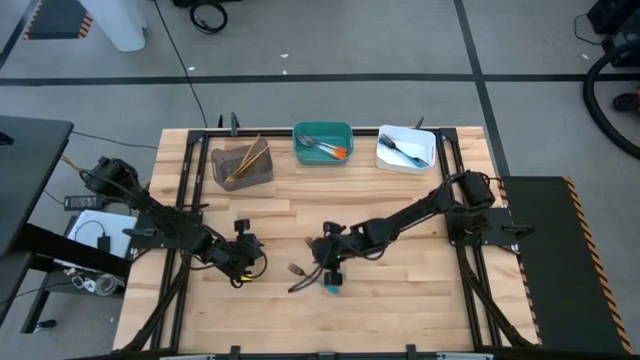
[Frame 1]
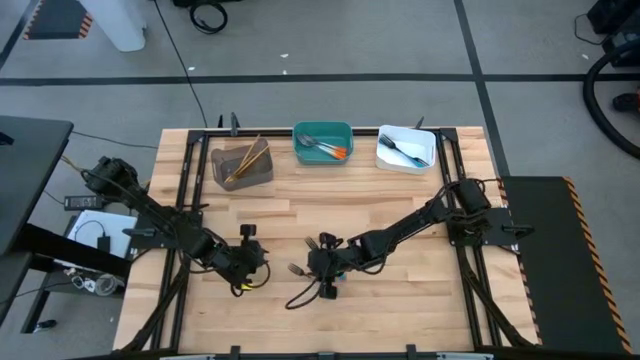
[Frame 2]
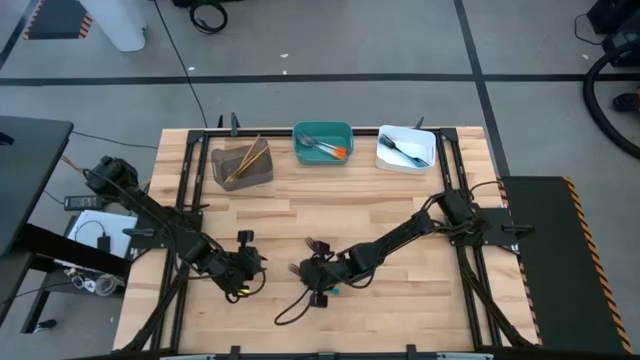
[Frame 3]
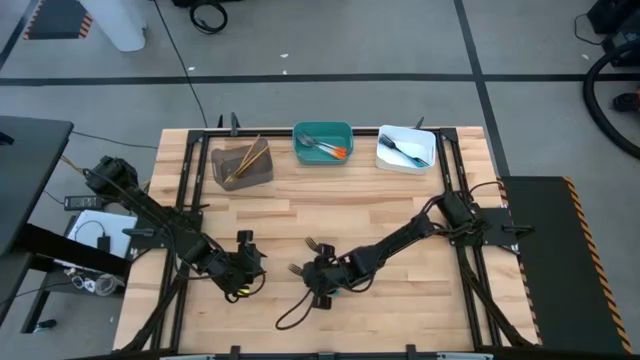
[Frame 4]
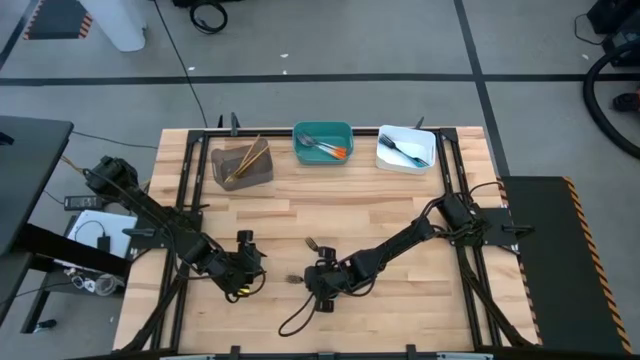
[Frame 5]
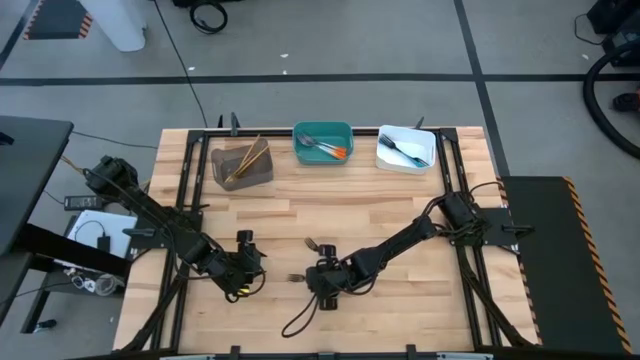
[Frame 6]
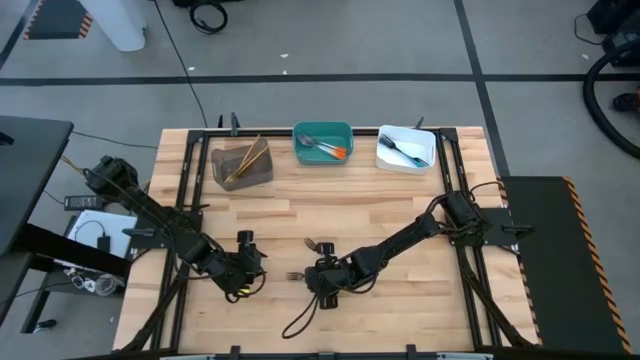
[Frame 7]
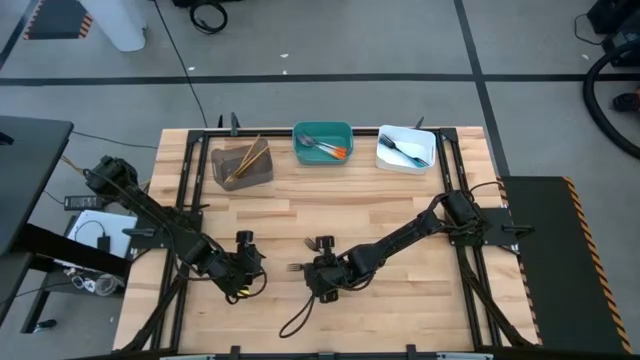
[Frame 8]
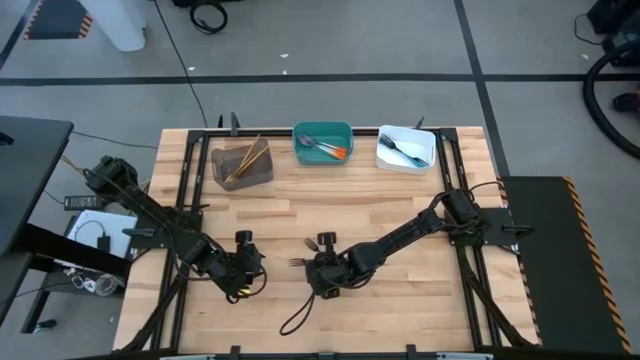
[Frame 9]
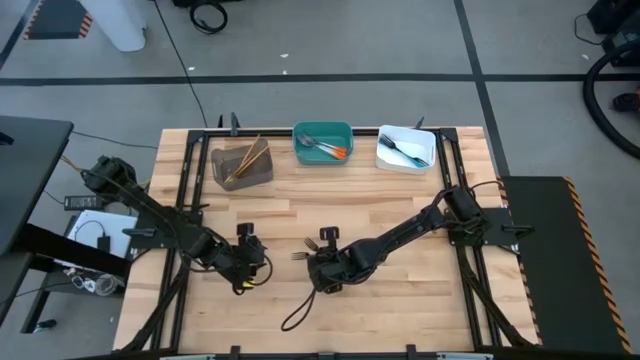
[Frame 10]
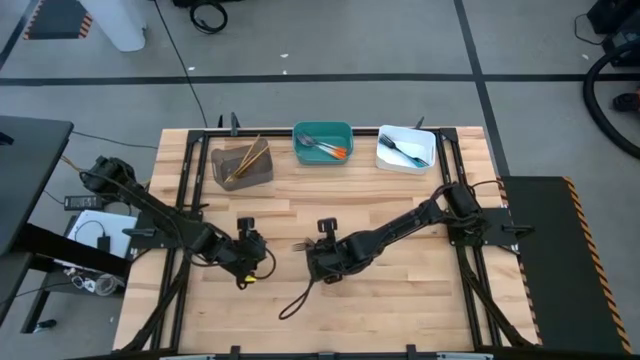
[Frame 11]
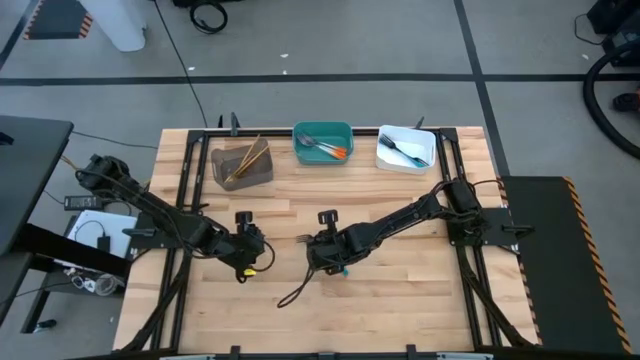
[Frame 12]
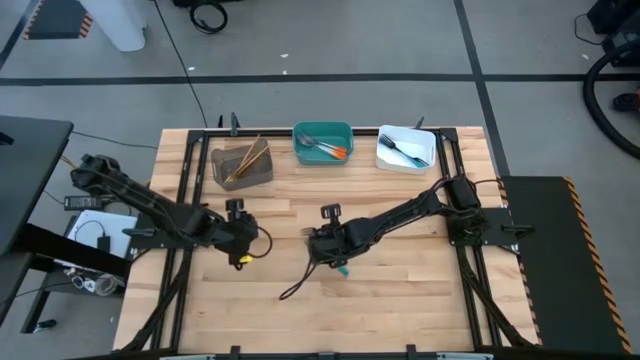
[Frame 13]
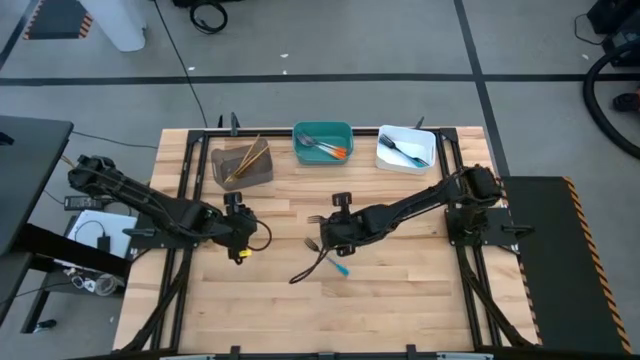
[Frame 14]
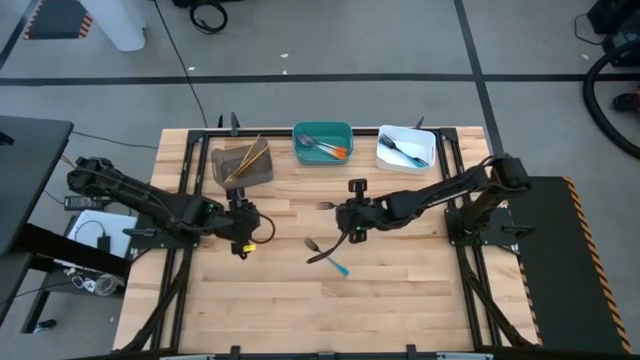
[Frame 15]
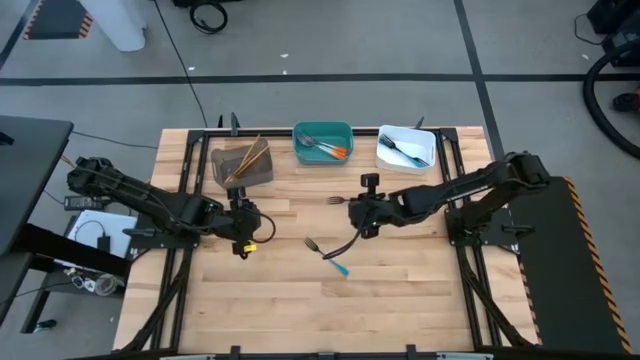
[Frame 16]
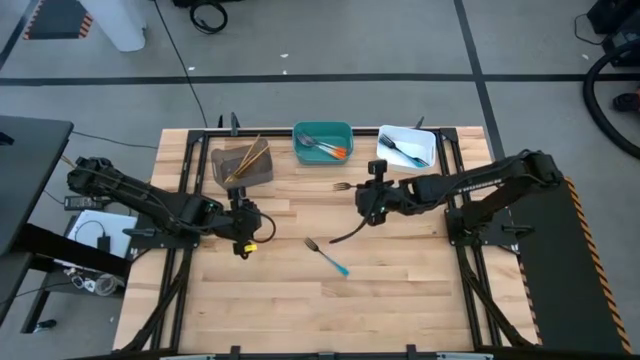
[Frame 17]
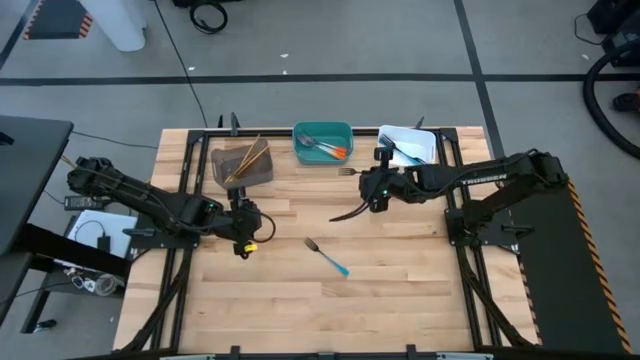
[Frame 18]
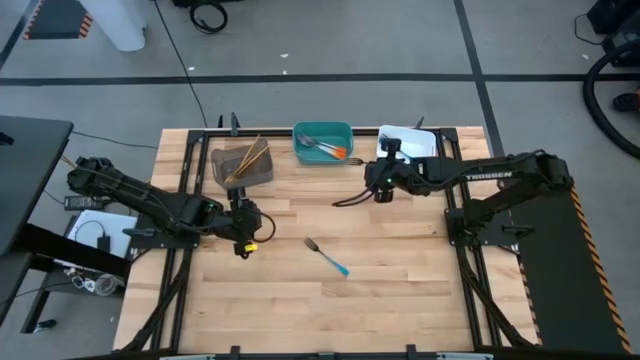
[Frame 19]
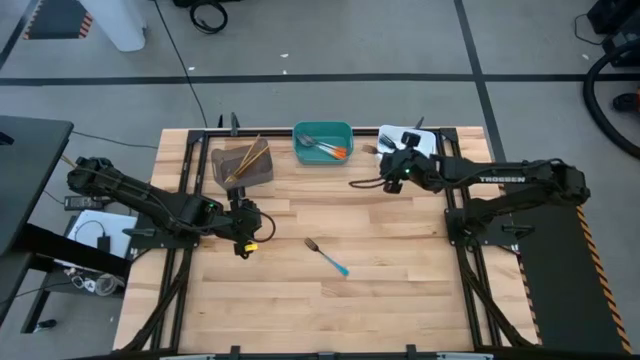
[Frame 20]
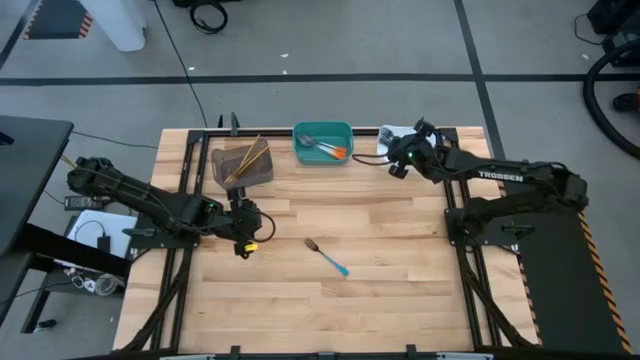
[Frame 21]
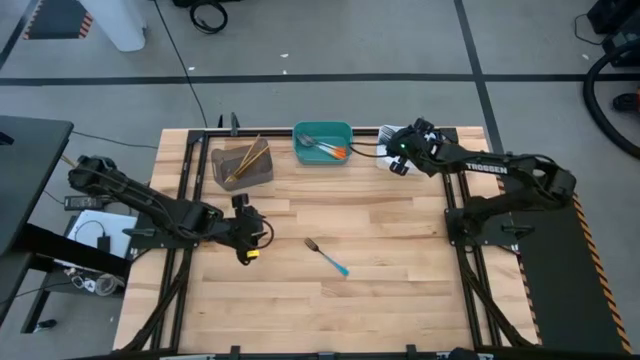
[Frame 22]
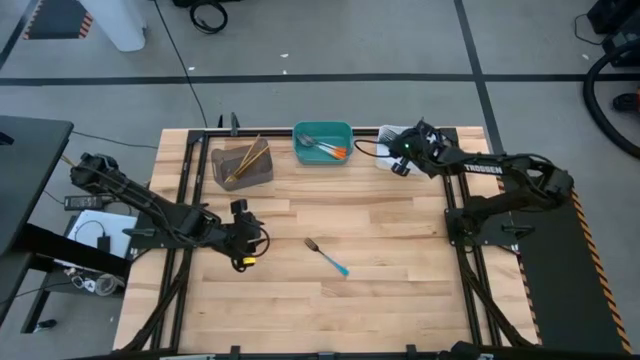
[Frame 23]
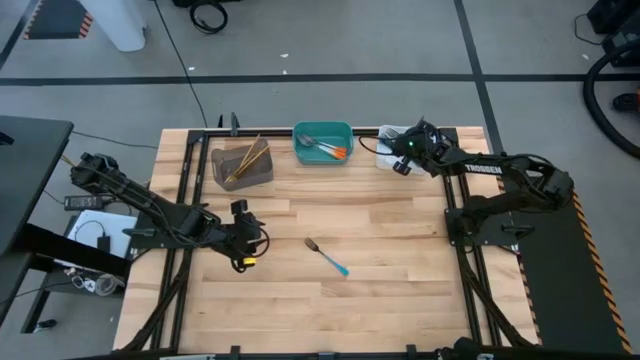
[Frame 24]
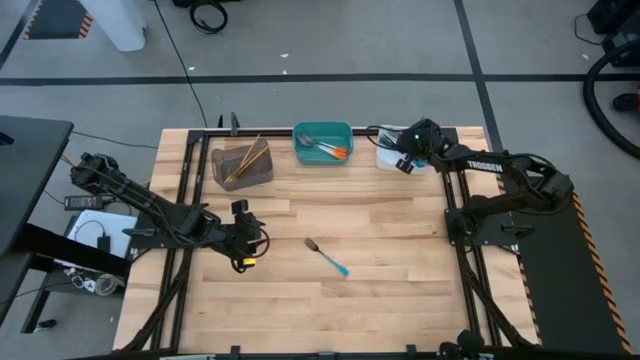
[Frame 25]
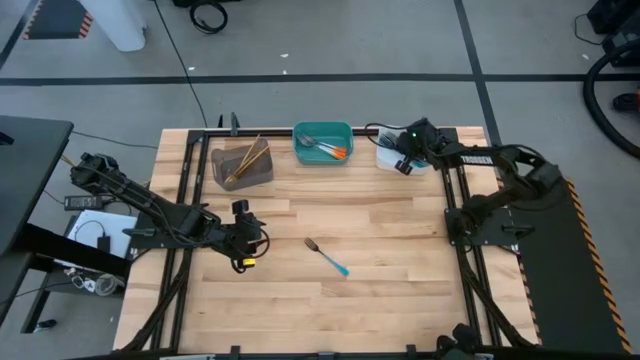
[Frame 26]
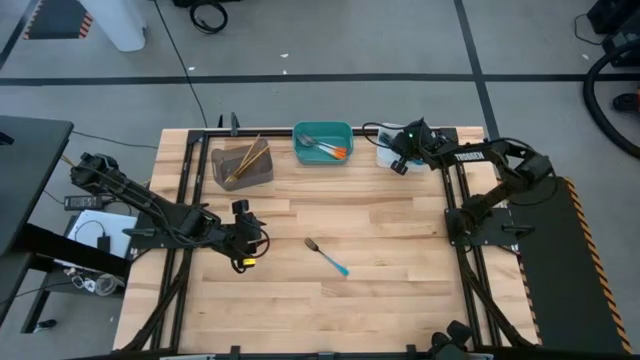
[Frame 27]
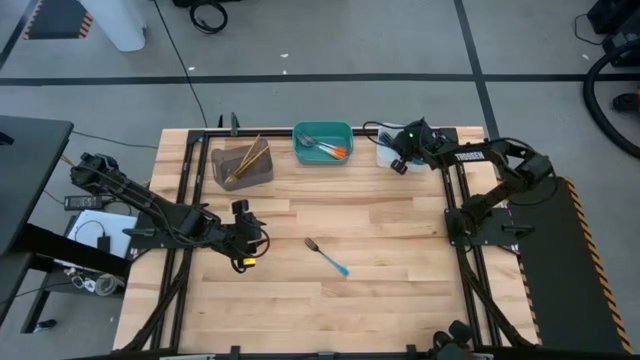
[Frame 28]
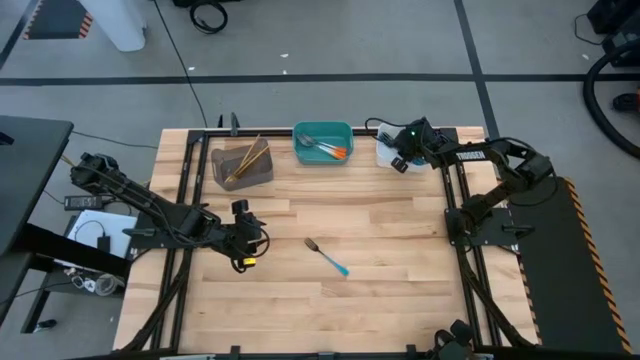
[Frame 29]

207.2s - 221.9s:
Task: Sort silverware by color (type)
Put the blue fork into the white bin

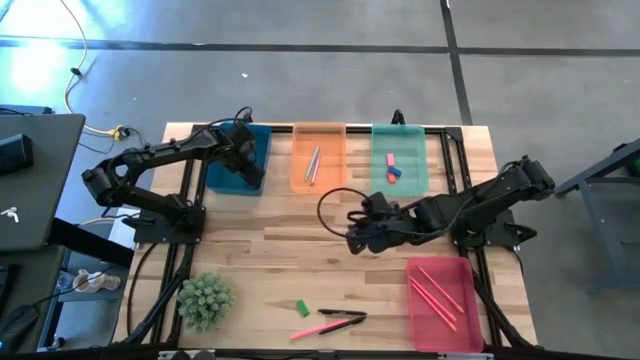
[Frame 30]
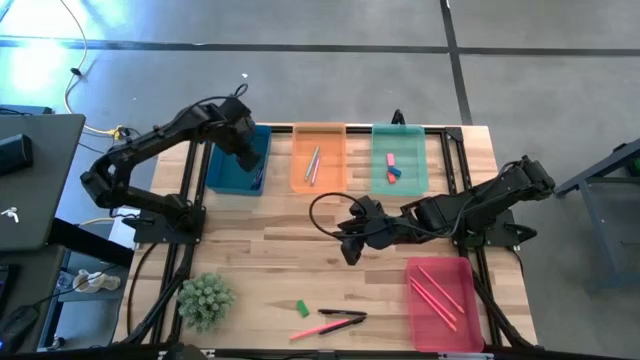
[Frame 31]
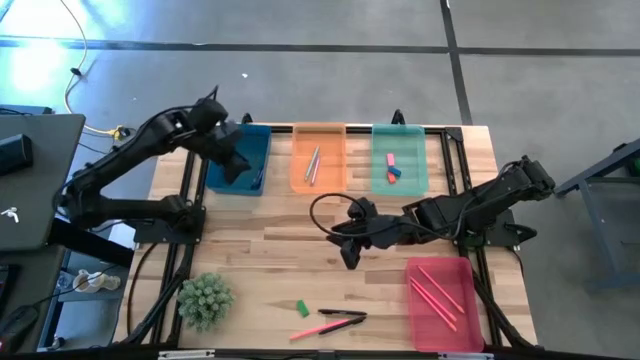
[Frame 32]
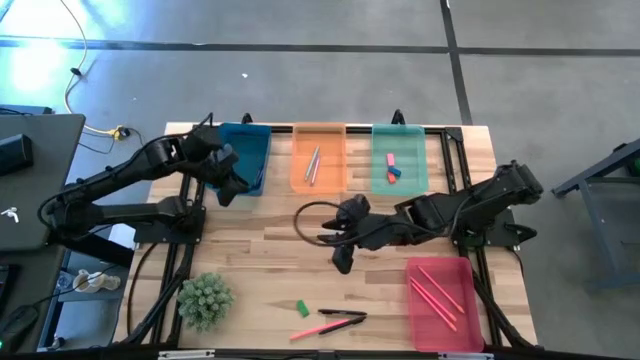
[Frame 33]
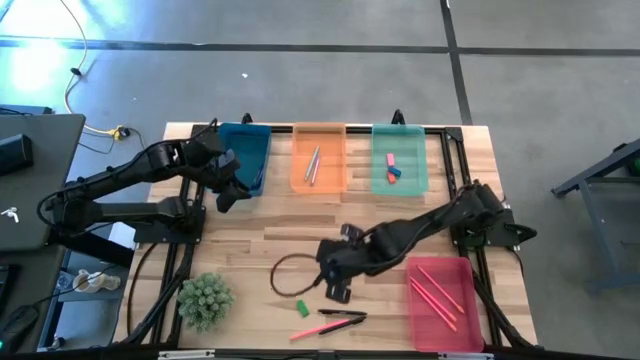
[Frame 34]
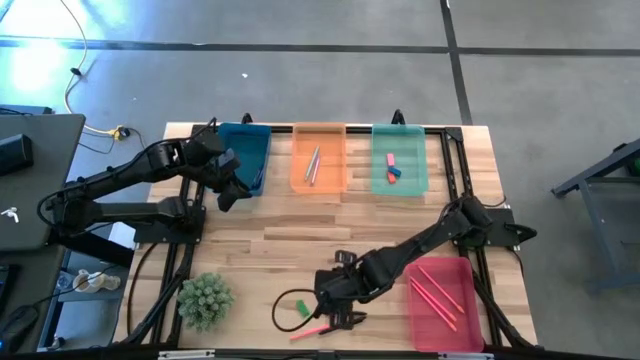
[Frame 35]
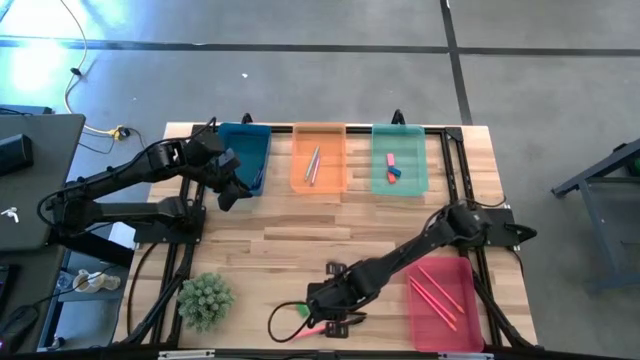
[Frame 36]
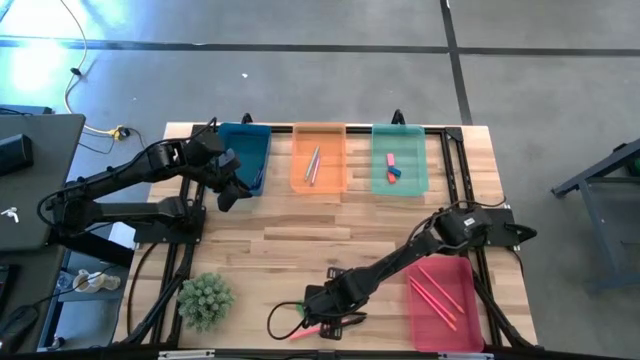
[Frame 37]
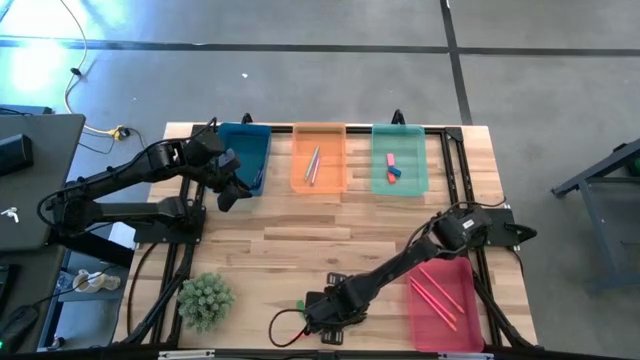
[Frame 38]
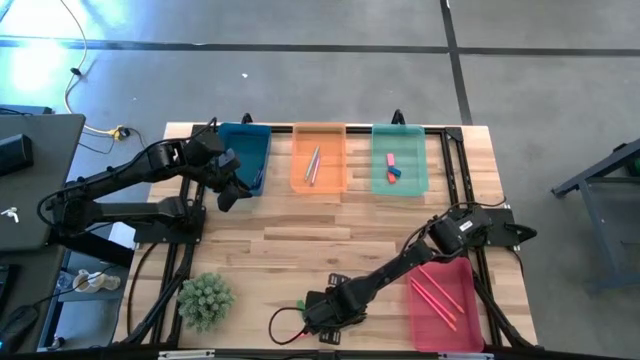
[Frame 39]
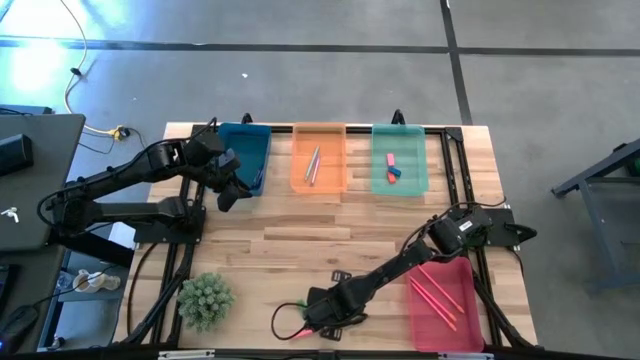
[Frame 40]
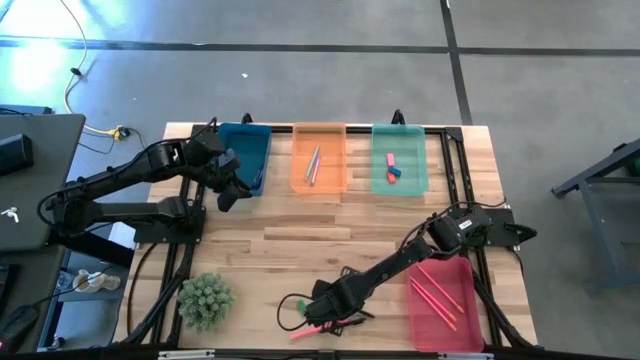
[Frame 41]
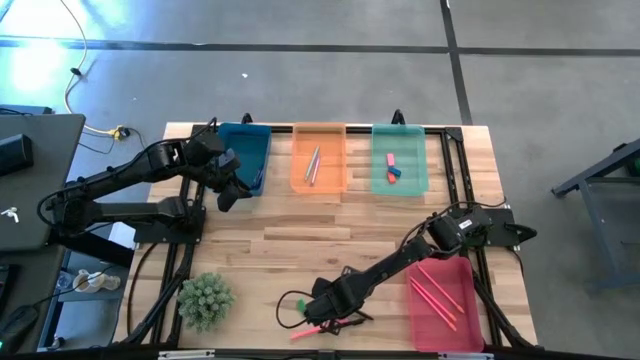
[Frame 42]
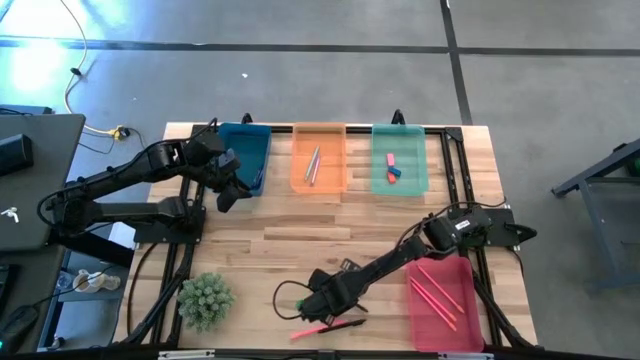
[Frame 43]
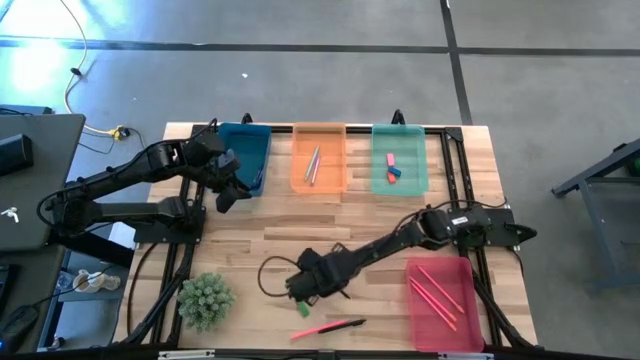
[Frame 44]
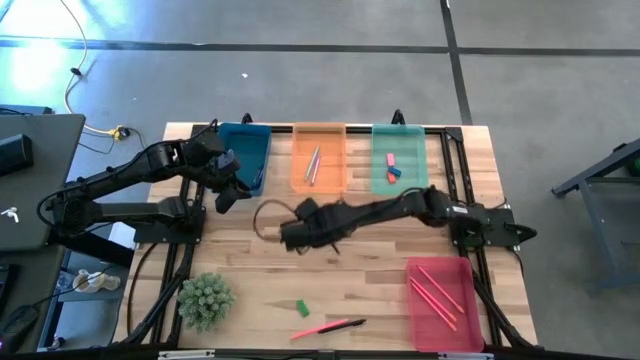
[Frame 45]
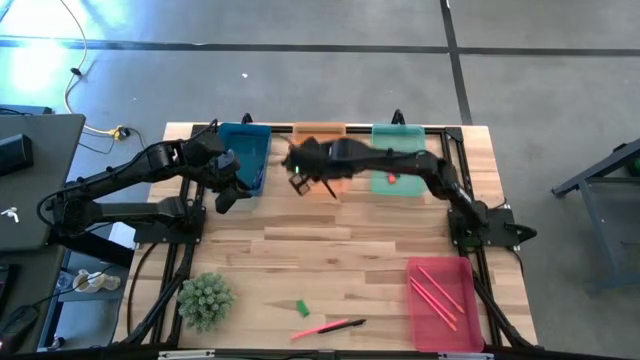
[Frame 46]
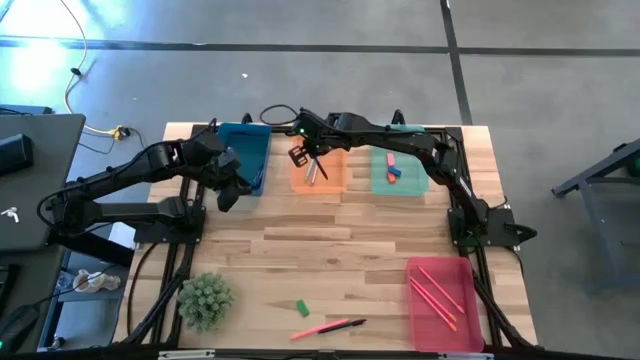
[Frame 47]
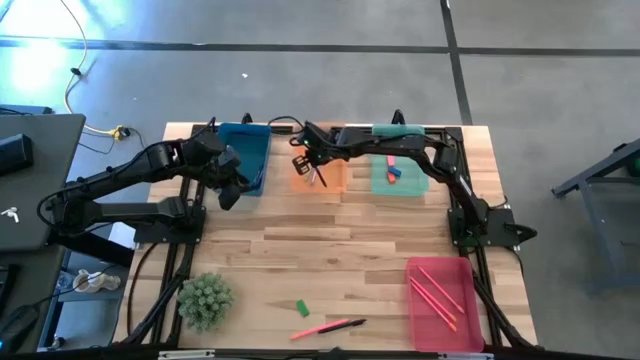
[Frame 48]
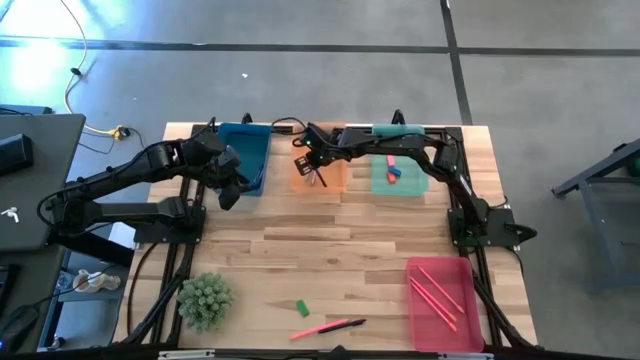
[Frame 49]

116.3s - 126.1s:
Task: Sort crayons/erasers/pens/pencils in bins
Put the top black ballpen into the orange bin
